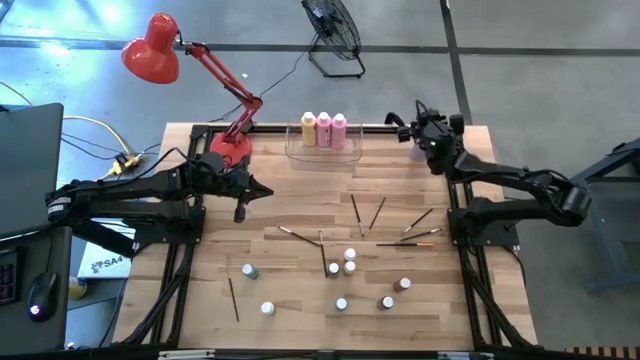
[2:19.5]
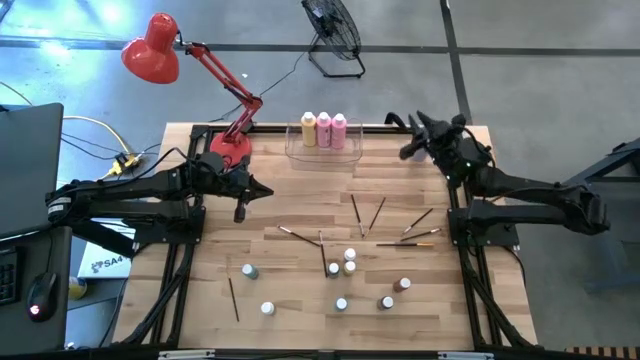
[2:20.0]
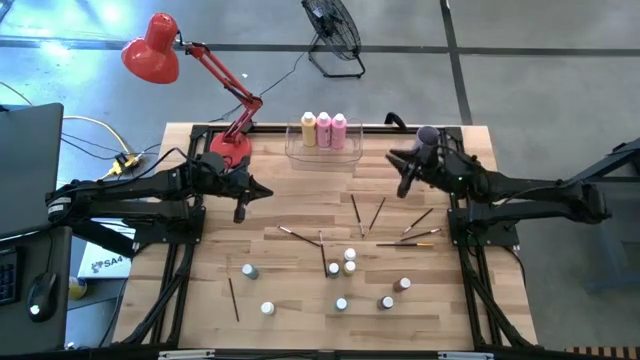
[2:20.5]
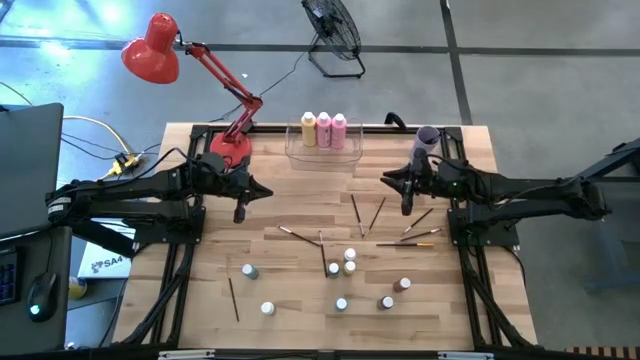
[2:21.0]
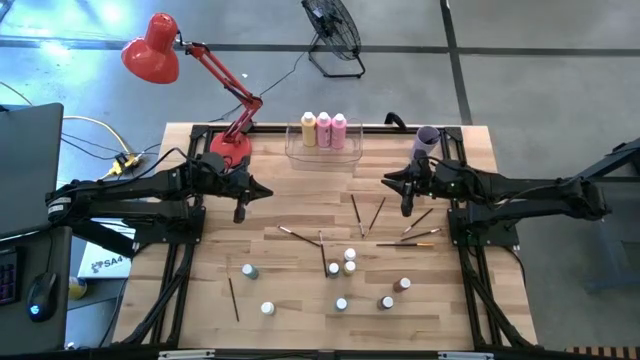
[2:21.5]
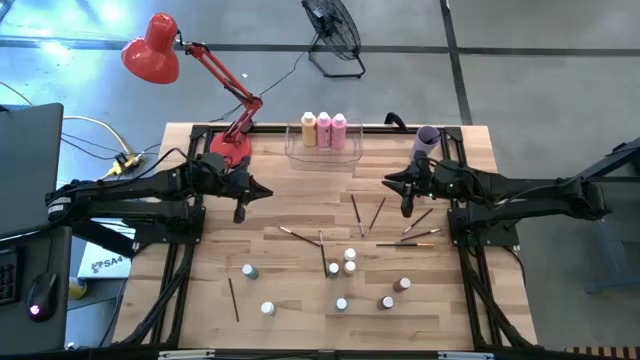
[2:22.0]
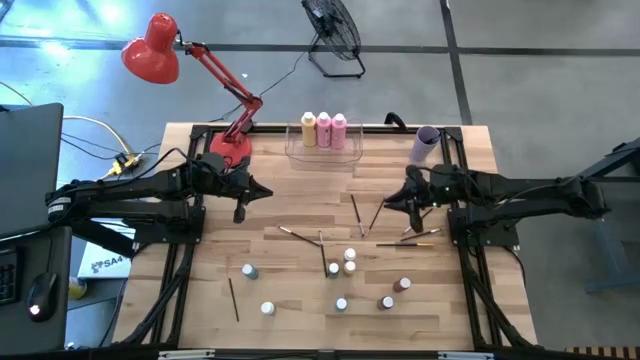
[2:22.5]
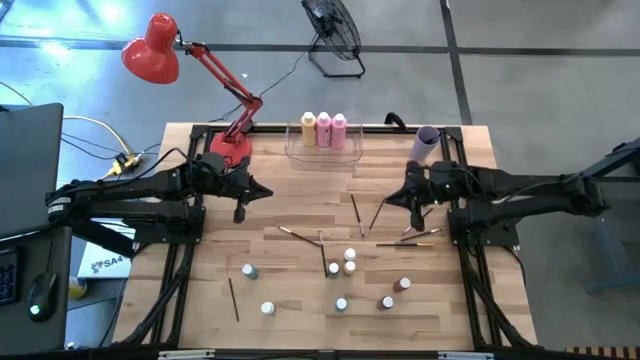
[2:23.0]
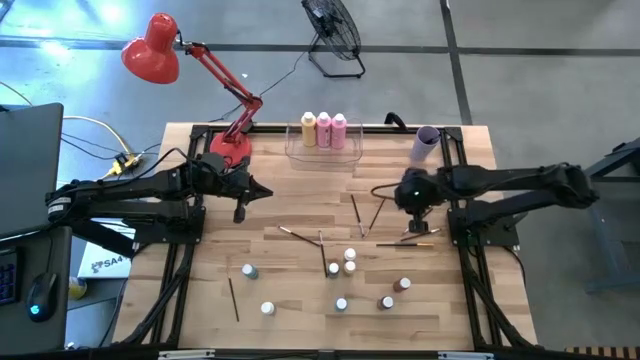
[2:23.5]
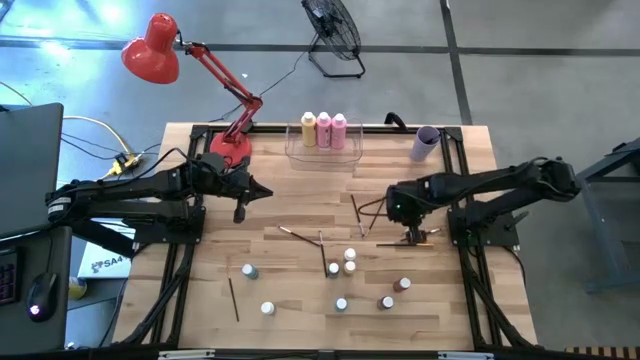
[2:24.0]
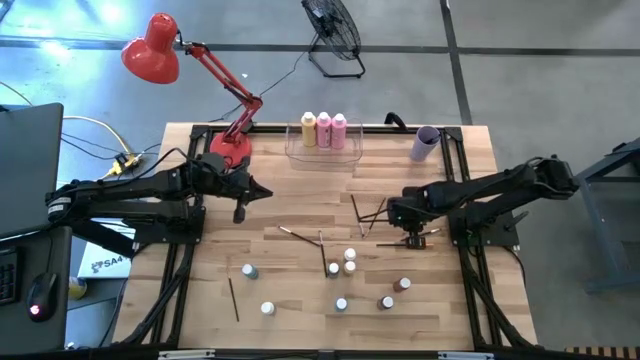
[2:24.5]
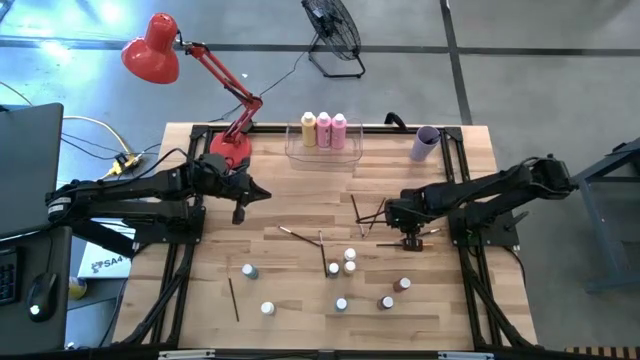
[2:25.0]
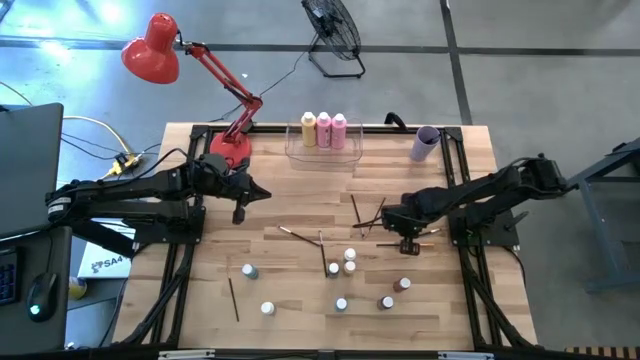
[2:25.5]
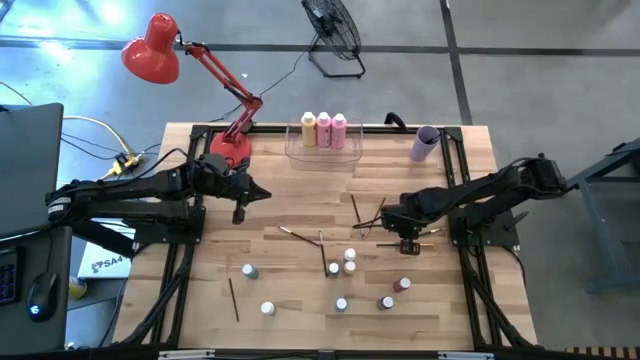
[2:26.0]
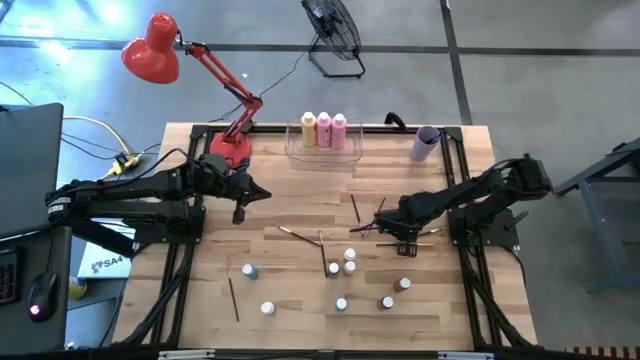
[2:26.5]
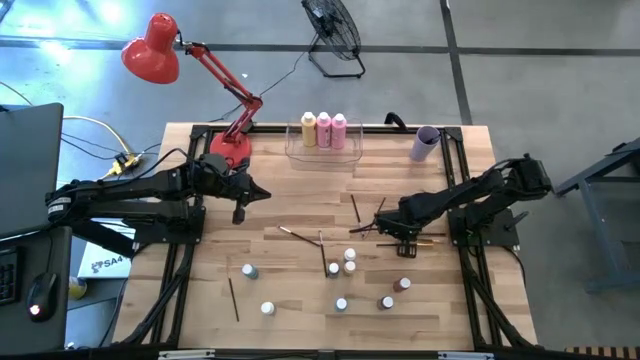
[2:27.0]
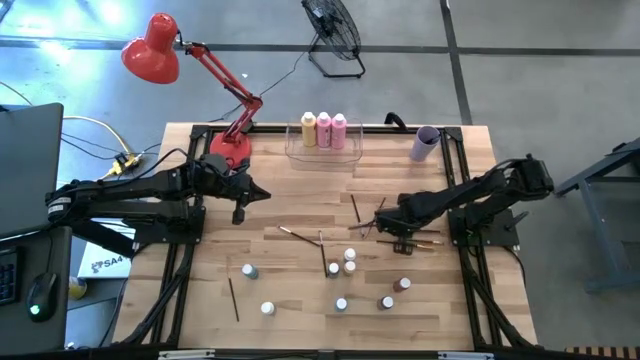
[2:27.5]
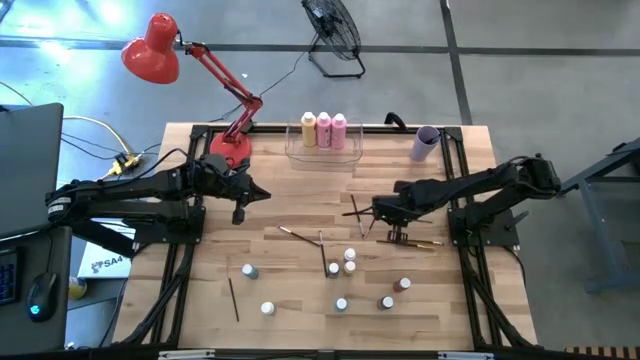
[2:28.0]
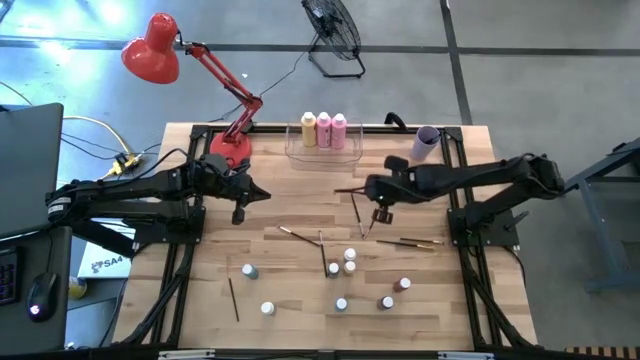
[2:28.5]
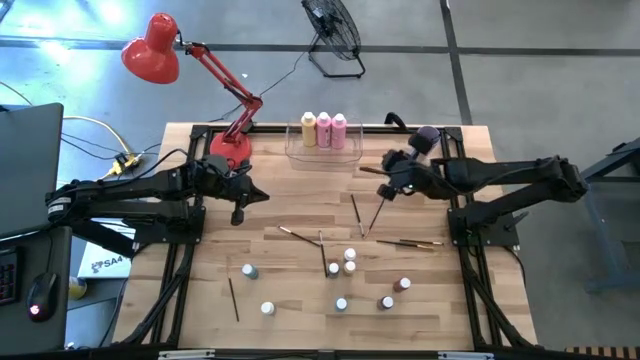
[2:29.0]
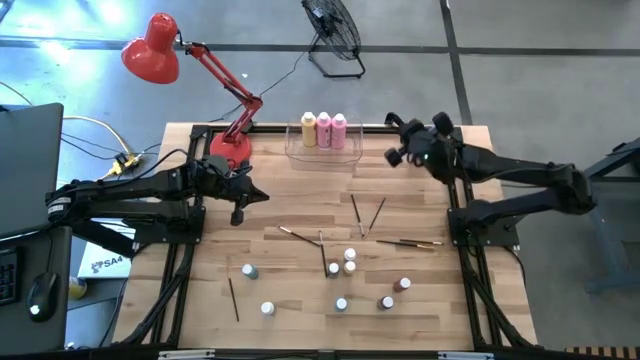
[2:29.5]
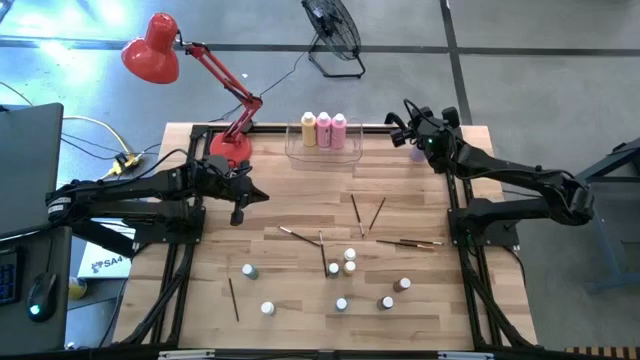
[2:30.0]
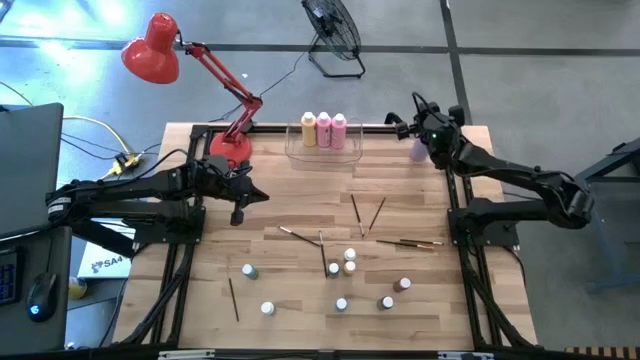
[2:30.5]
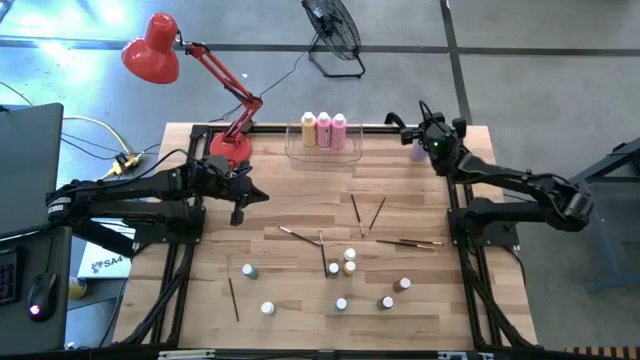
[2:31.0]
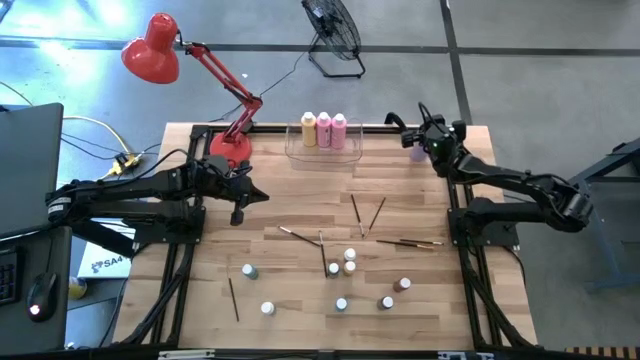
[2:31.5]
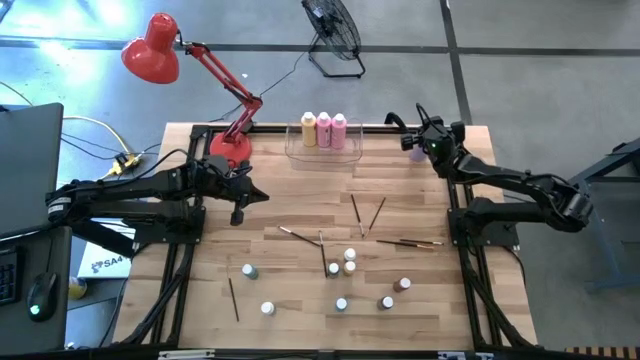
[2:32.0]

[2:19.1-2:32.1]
Task: Pick & Place Paint Supplies
Put the black paint brush into the violet cup

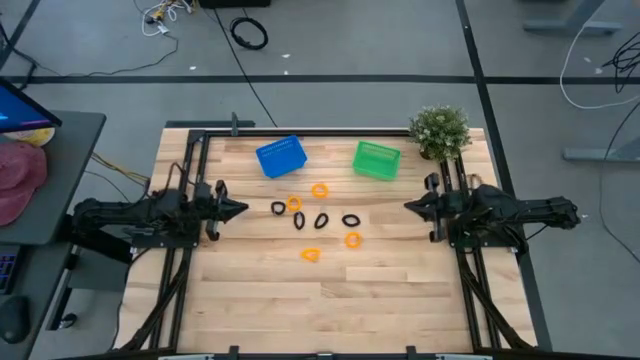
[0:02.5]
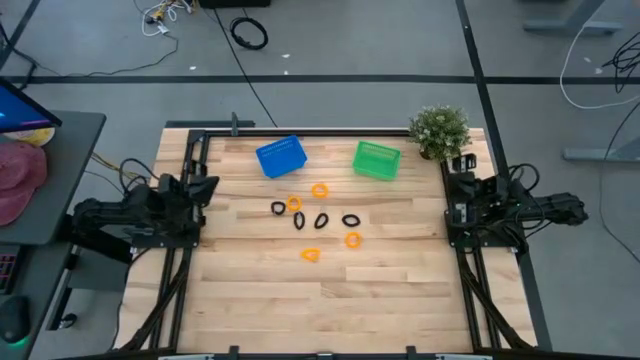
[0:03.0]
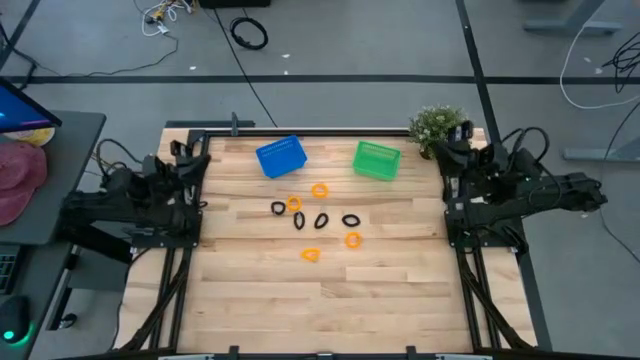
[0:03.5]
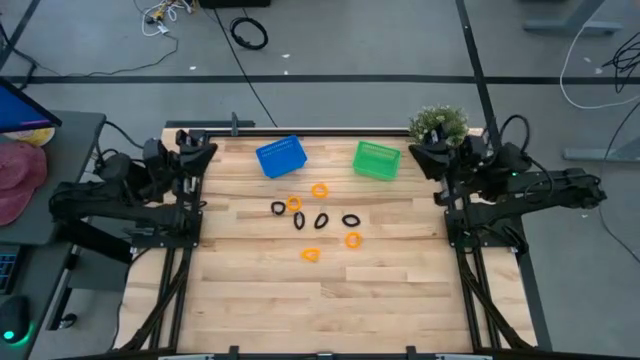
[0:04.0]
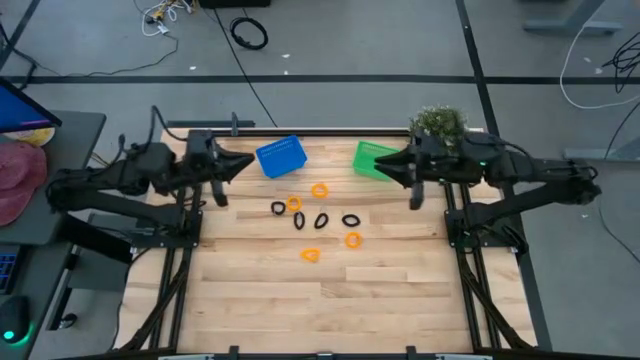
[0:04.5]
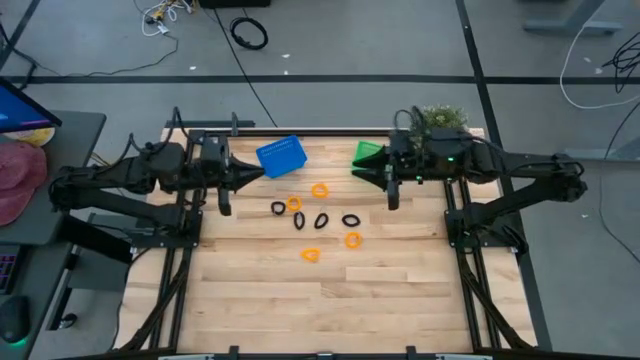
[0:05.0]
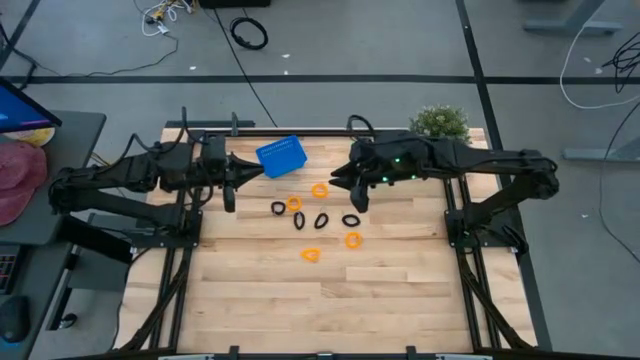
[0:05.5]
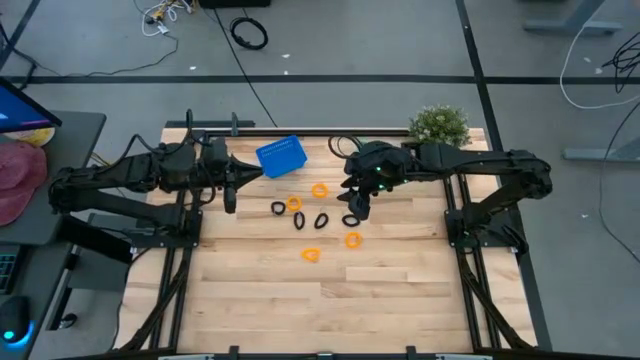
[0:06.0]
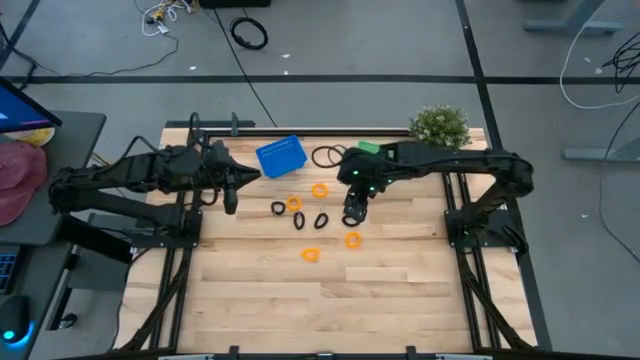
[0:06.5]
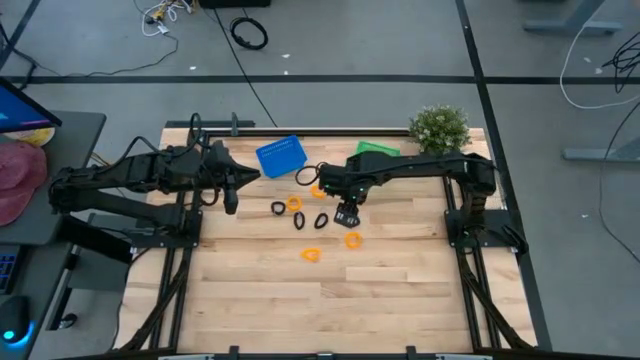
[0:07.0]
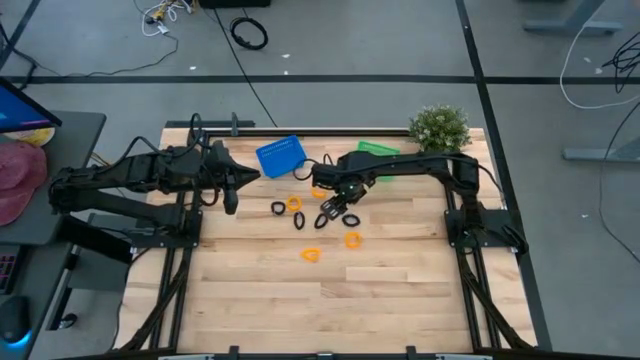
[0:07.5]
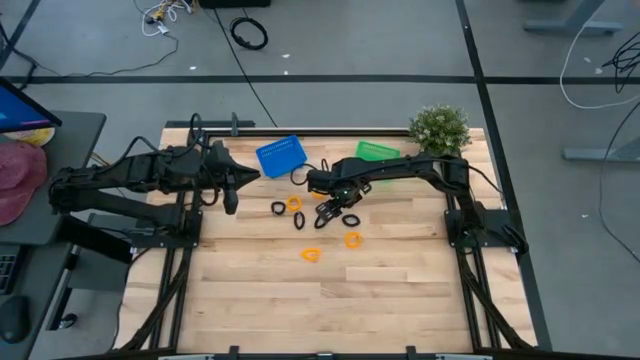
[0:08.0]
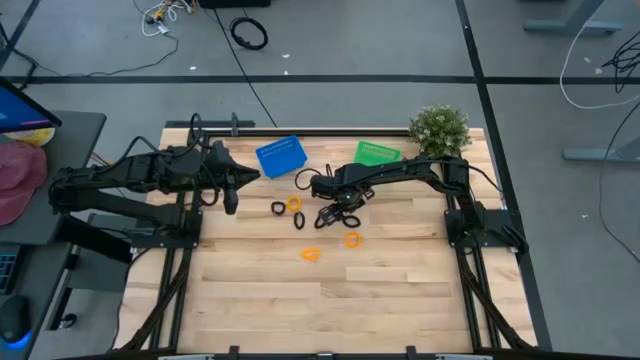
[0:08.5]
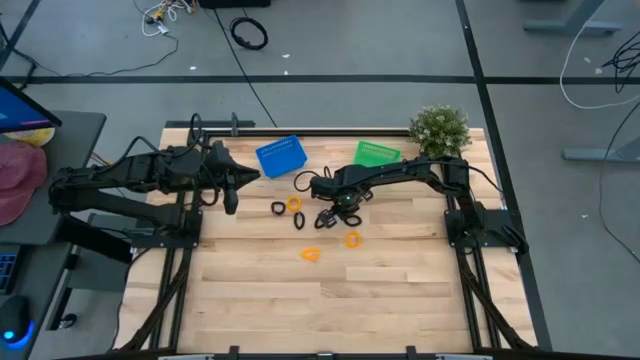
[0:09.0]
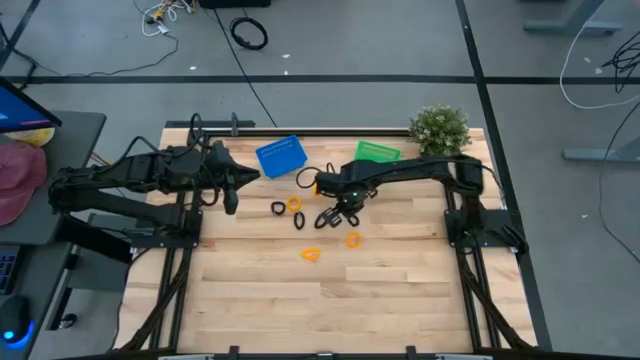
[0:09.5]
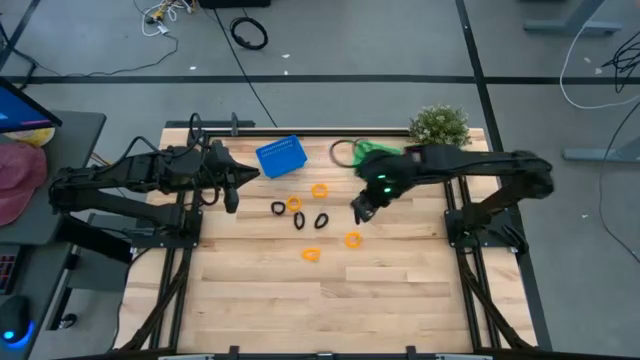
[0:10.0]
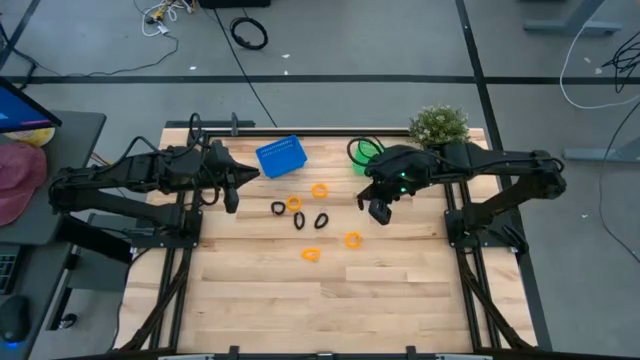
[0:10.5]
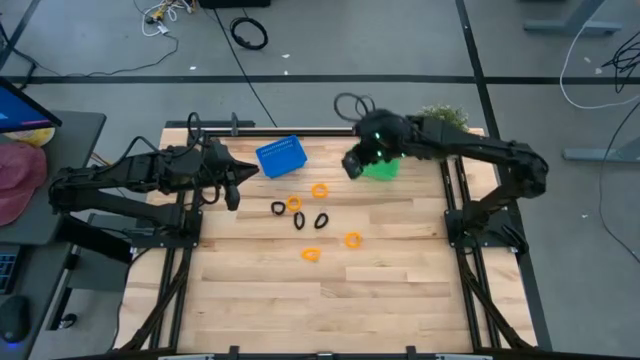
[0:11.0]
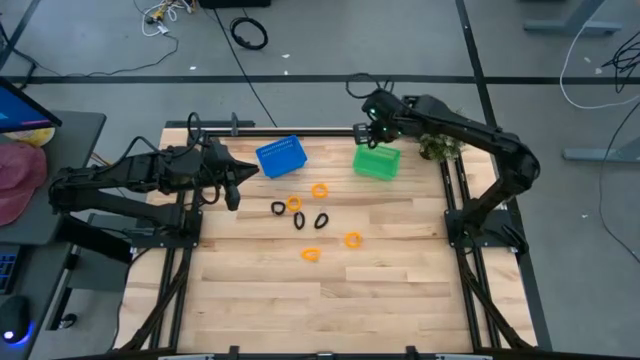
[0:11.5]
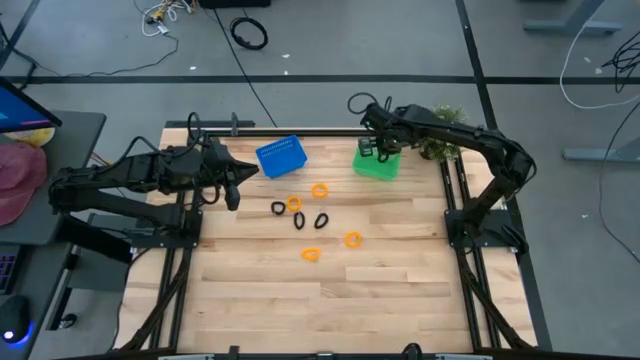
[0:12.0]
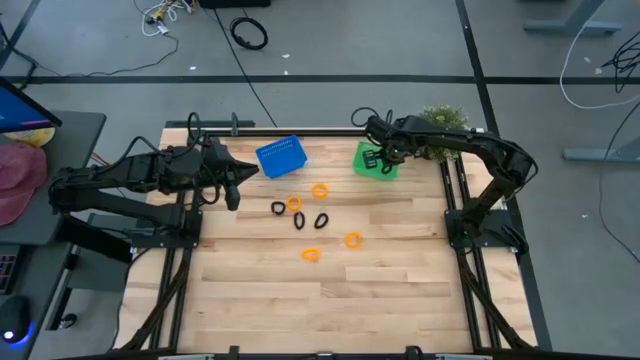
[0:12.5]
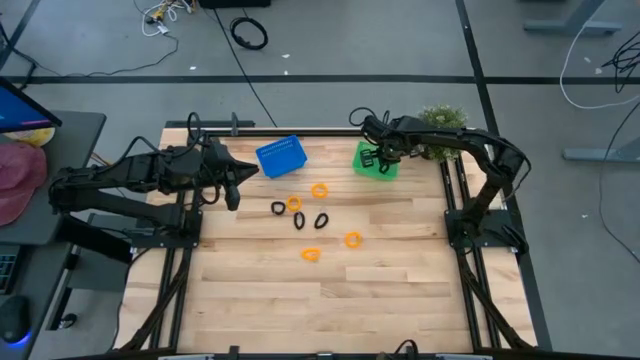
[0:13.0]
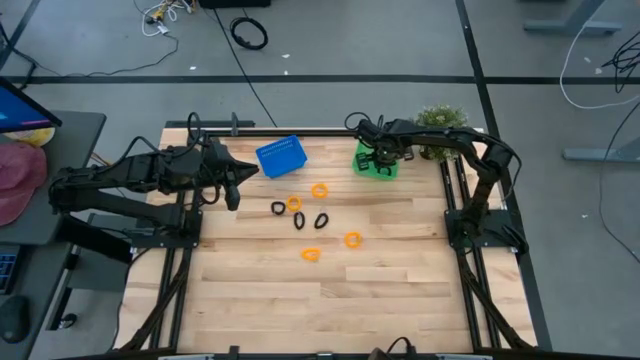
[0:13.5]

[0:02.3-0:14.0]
Task: Sort spring keychains
Put the black spring keychain into the green bin
